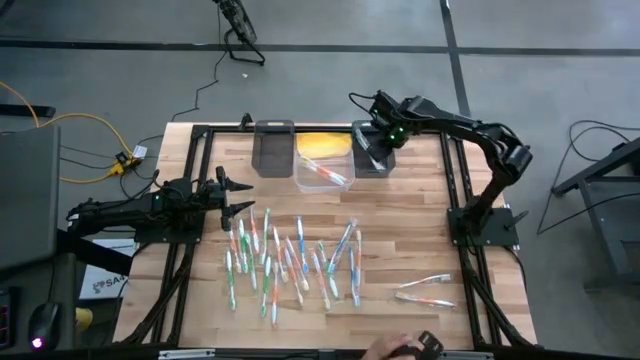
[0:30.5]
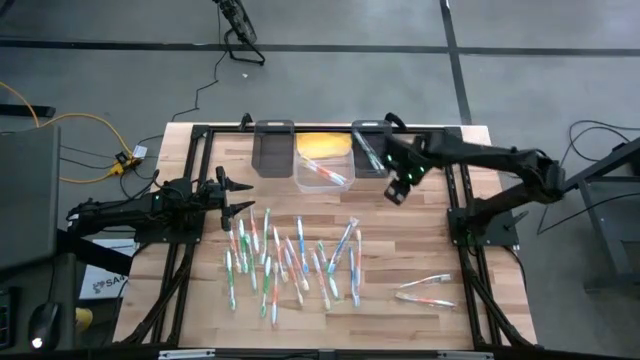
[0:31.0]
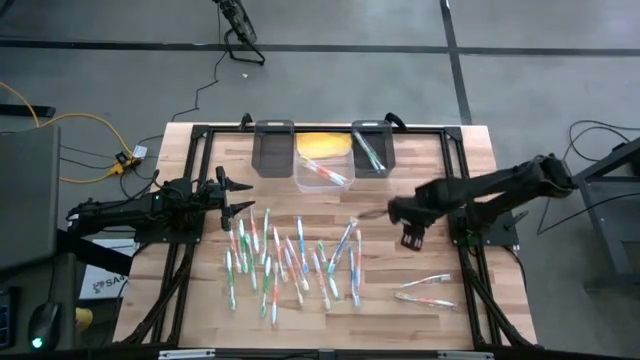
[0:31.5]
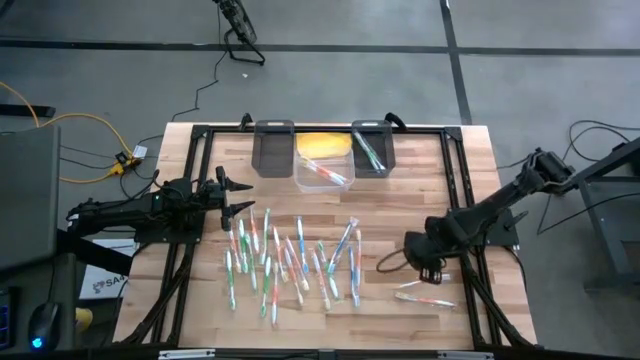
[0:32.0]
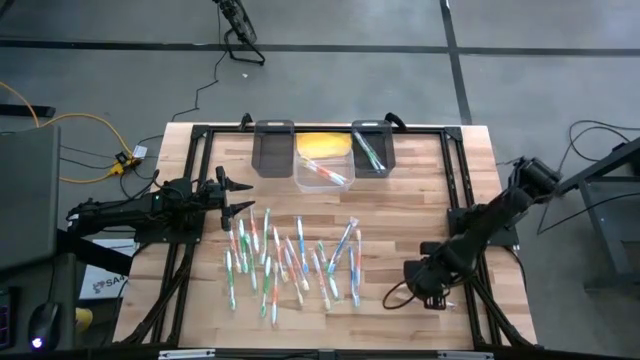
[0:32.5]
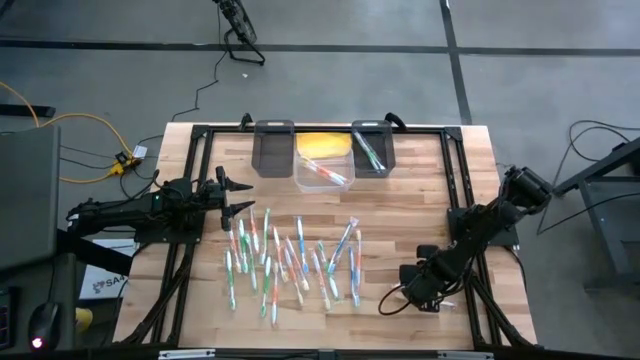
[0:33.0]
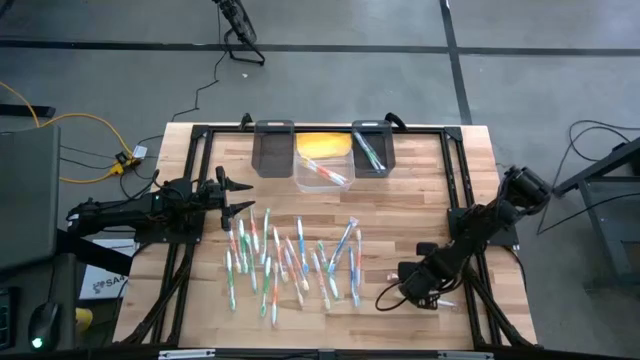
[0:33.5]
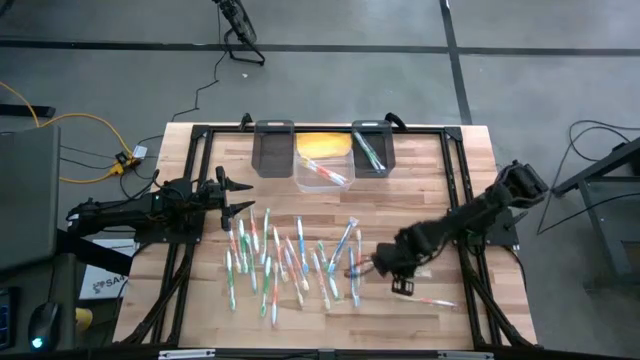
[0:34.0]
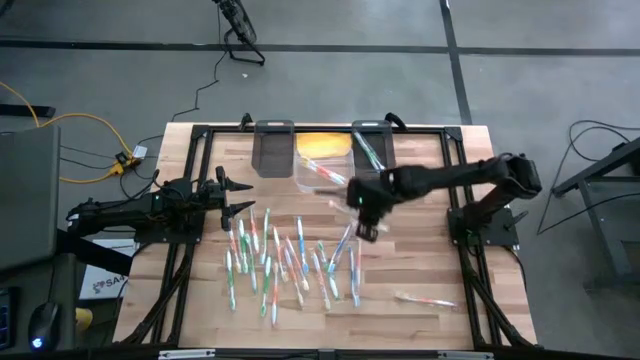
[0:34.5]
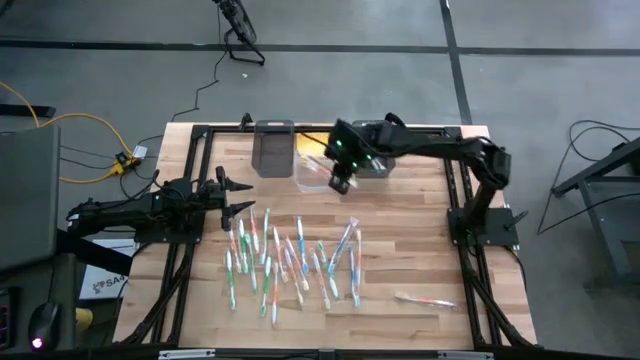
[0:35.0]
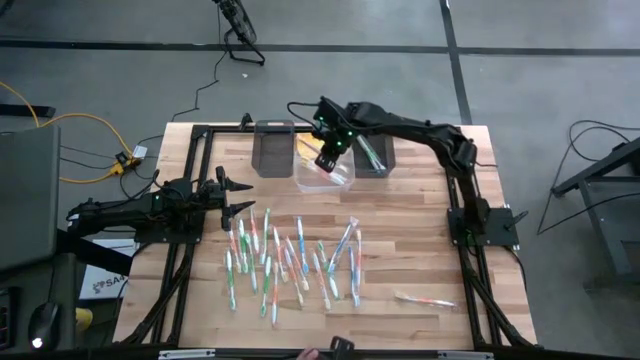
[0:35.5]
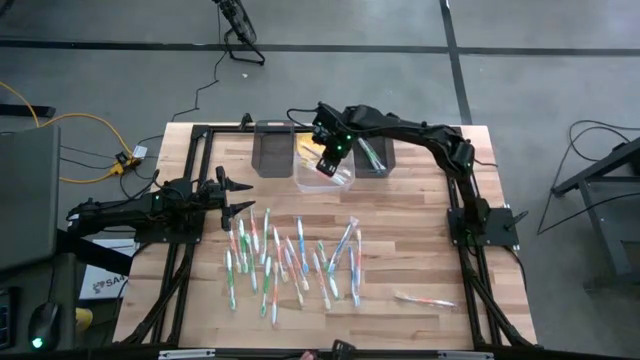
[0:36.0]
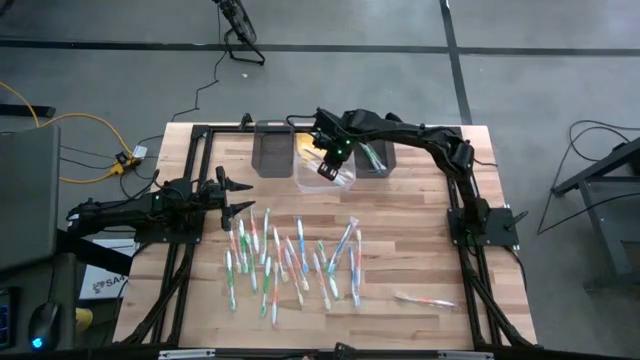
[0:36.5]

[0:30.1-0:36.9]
Task: Pick & Place Toothbrushes
Put the orange toothbrush into the transparent bin

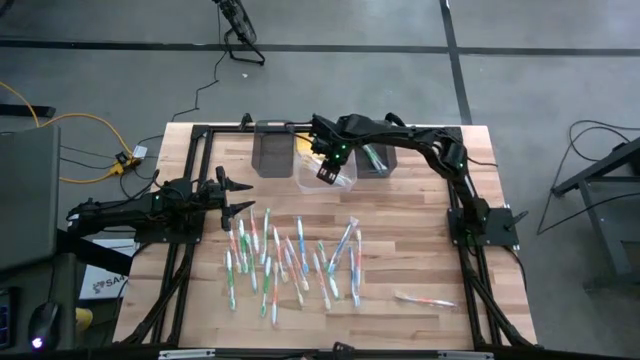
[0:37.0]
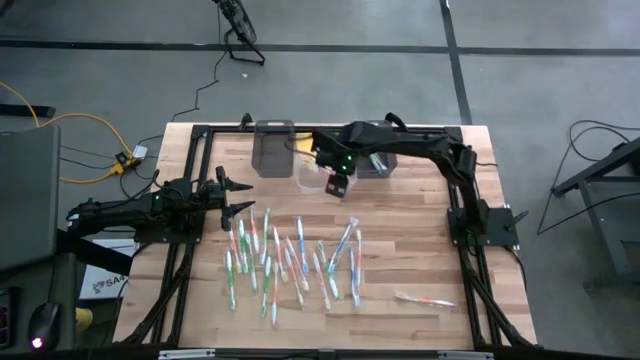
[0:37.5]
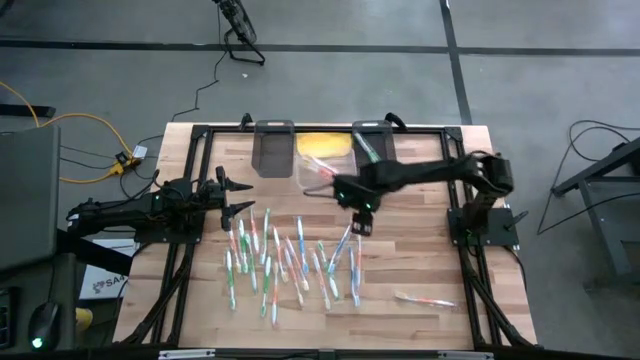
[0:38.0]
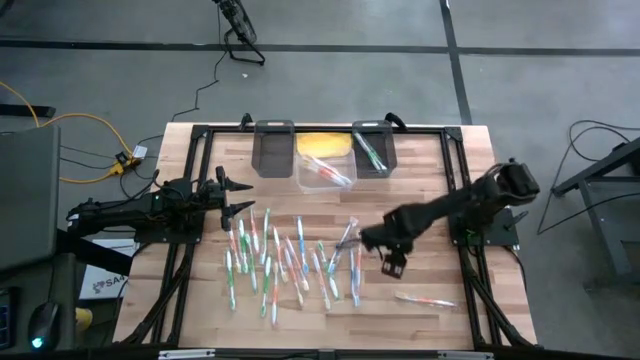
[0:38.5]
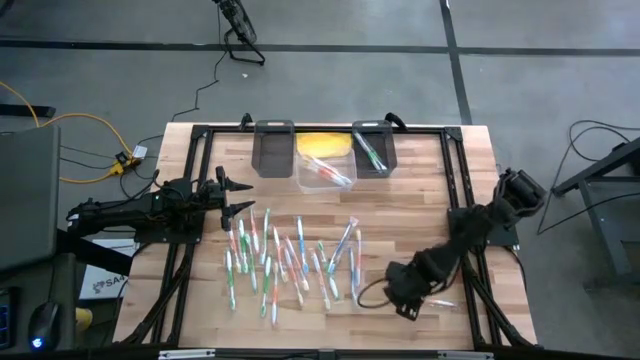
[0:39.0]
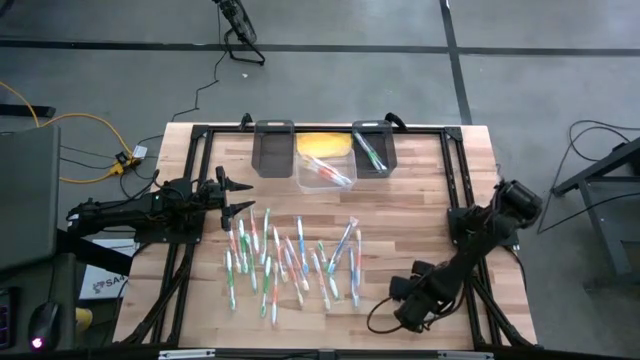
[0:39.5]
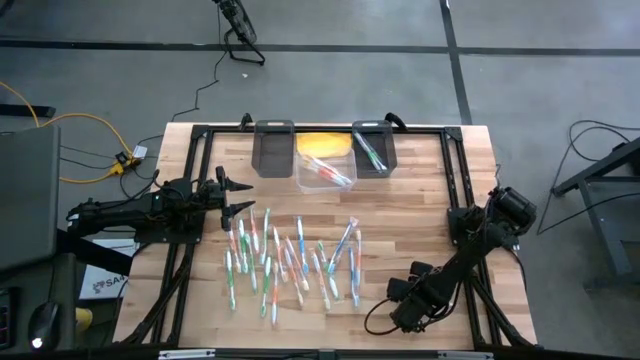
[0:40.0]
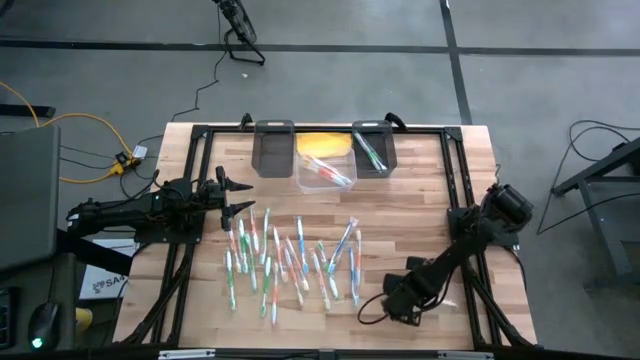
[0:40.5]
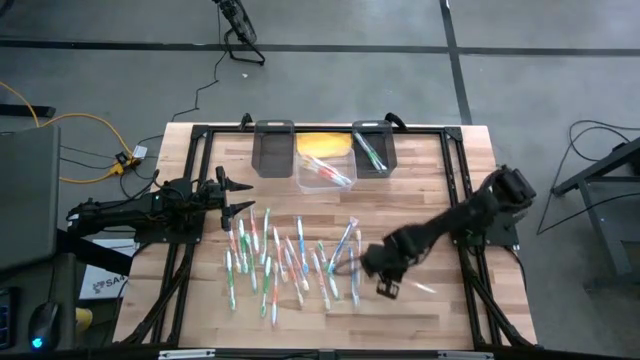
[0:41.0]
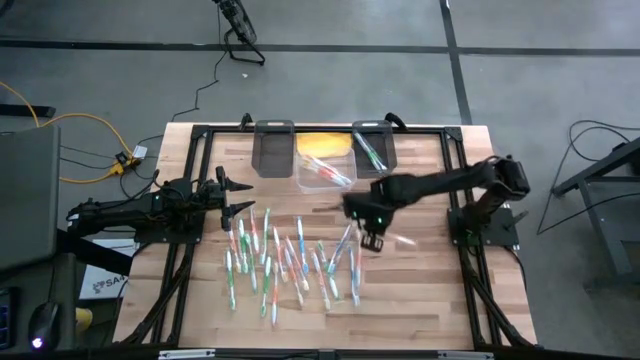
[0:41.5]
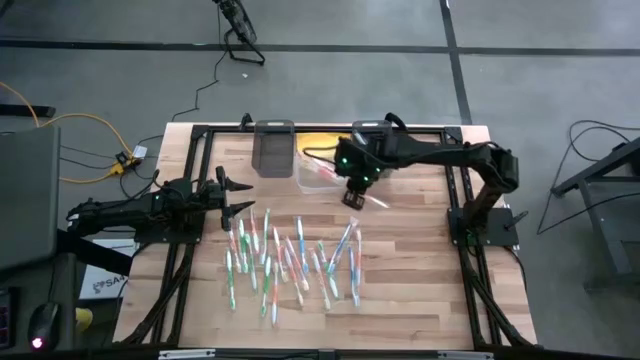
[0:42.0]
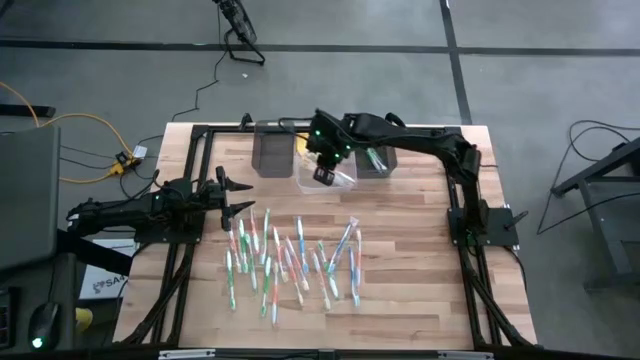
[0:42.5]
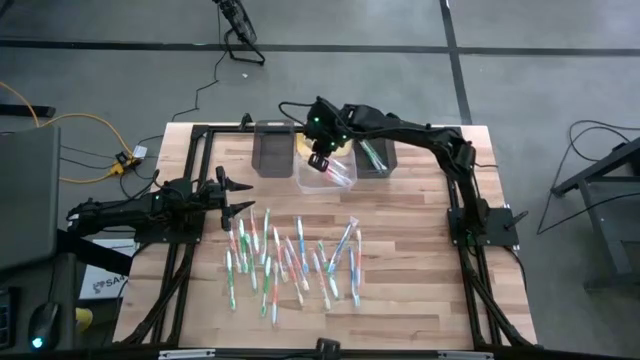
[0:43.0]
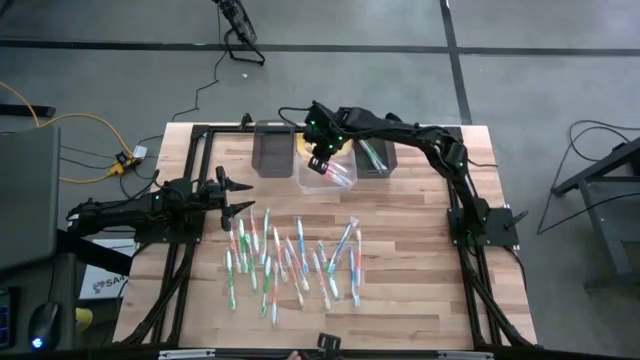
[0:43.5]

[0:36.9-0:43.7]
Put the orange toothbrush into the transparent bin

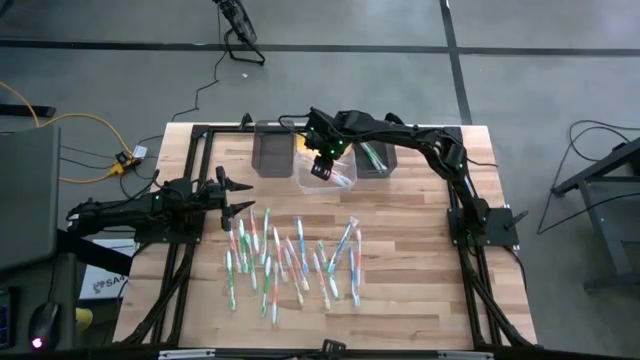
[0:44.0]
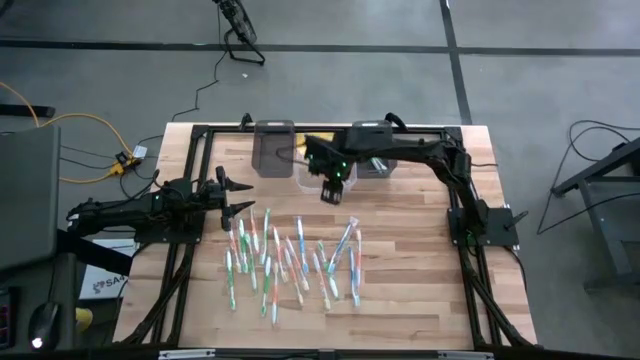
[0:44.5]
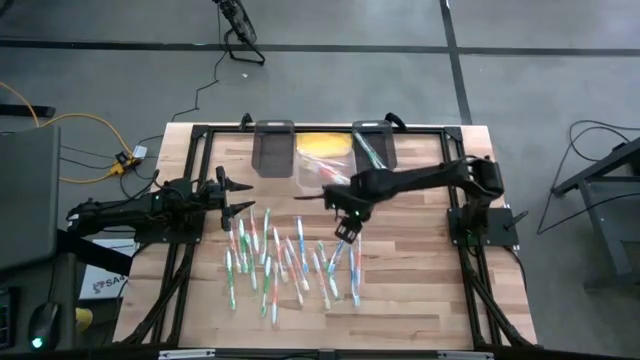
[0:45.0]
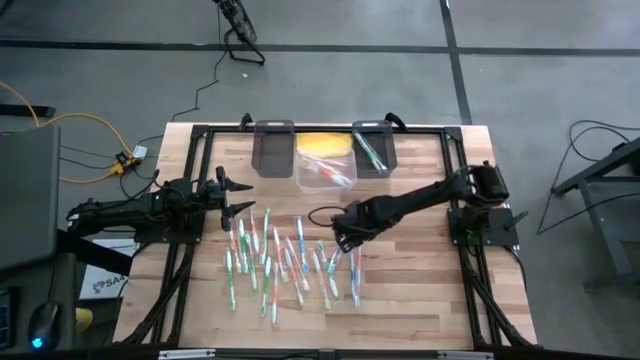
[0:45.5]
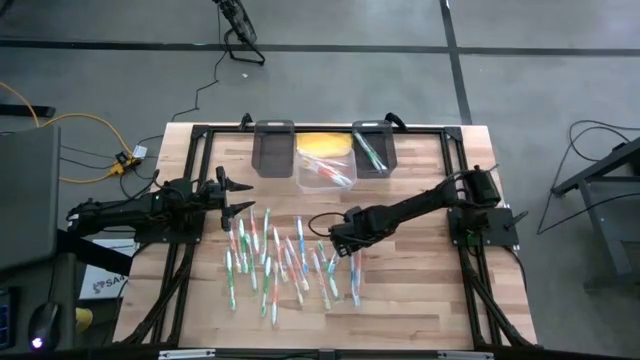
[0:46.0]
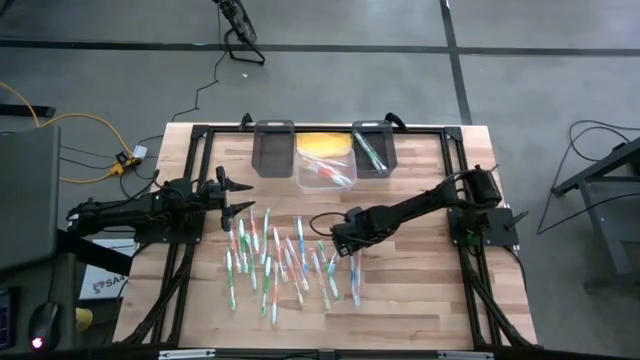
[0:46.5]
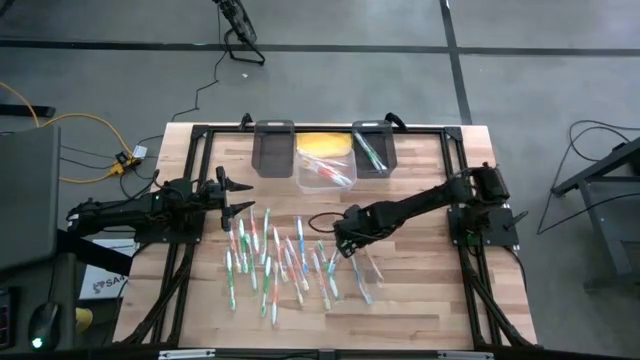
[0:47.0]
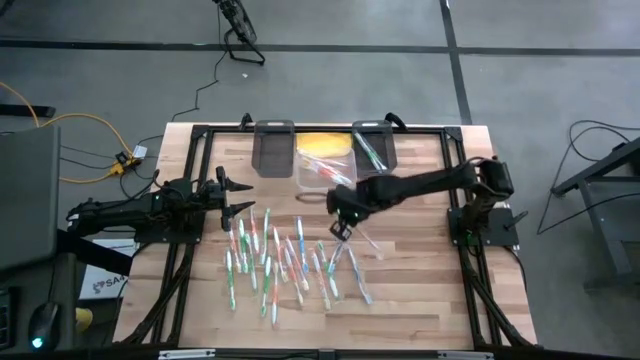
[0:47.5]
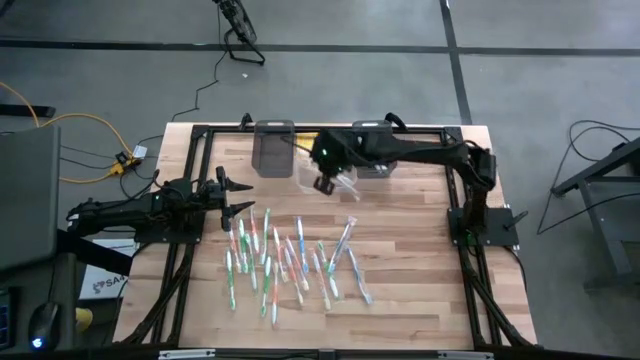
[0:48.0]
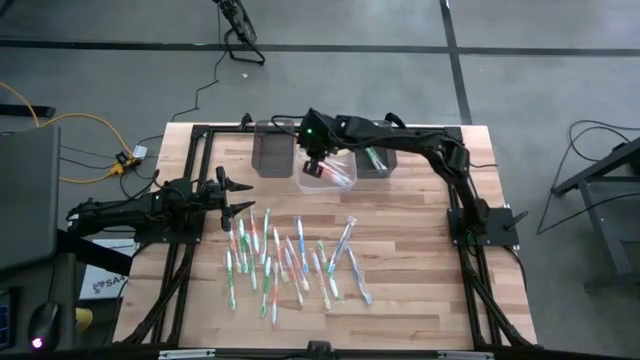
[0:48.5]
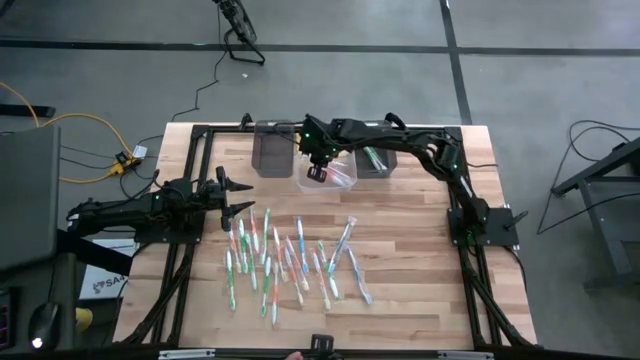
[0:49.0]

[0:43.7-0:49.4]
Put the orange toothbrush into the transparent bin

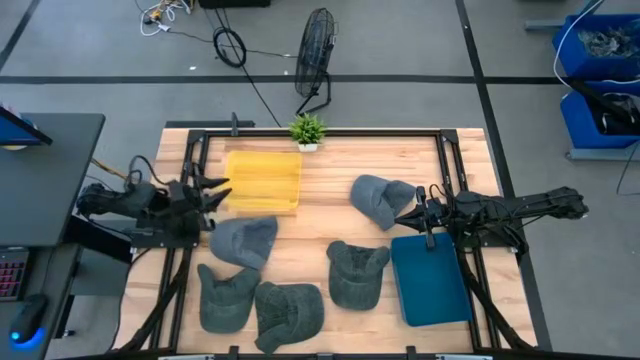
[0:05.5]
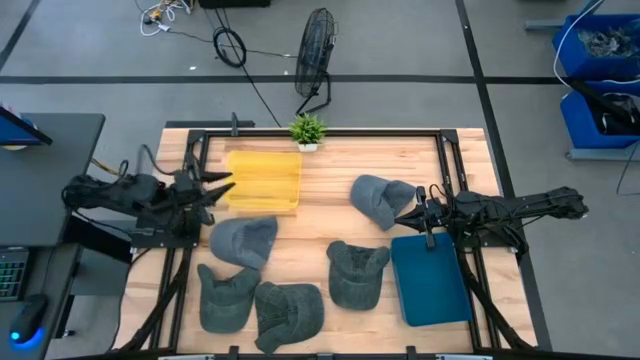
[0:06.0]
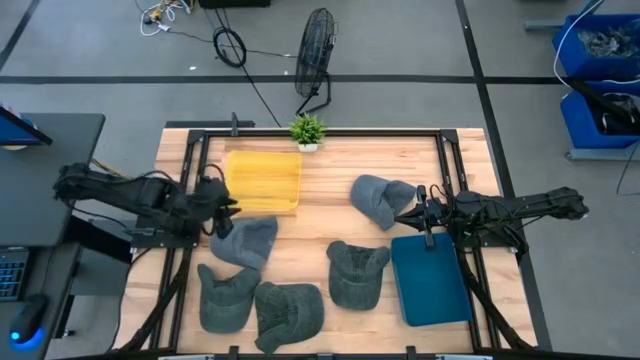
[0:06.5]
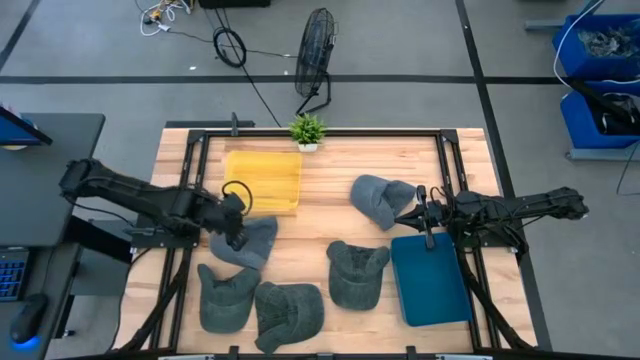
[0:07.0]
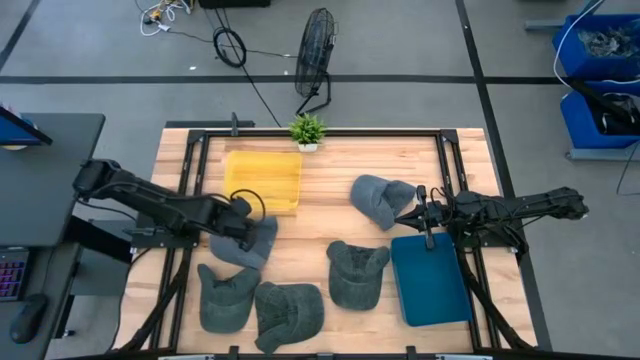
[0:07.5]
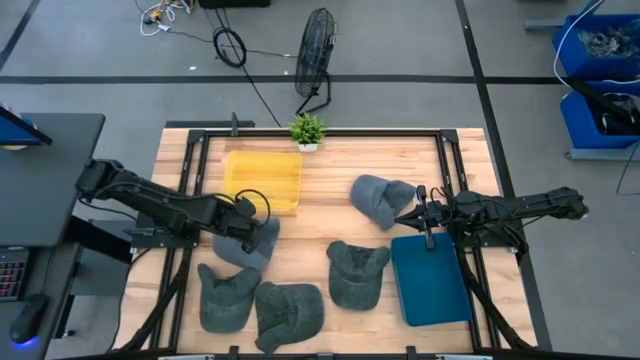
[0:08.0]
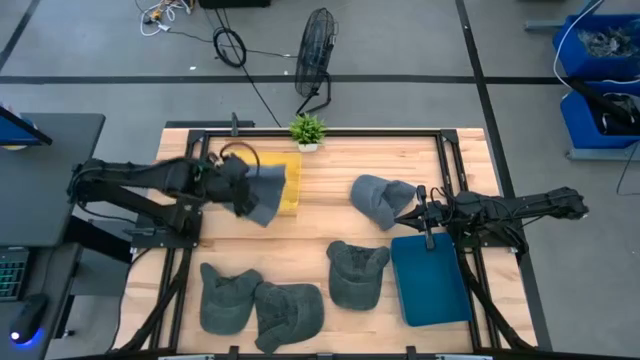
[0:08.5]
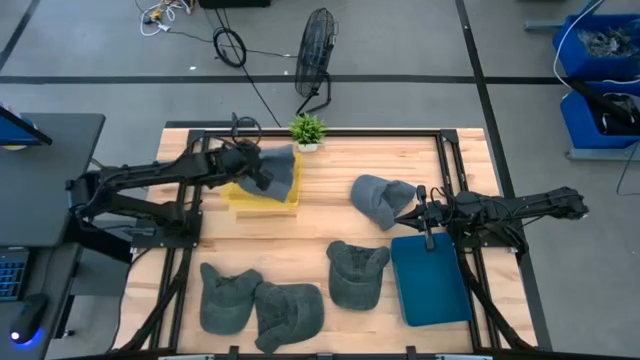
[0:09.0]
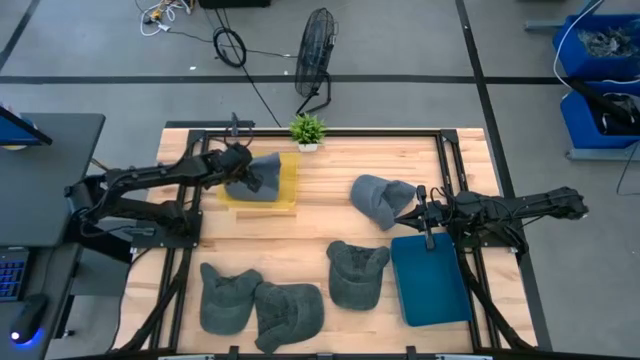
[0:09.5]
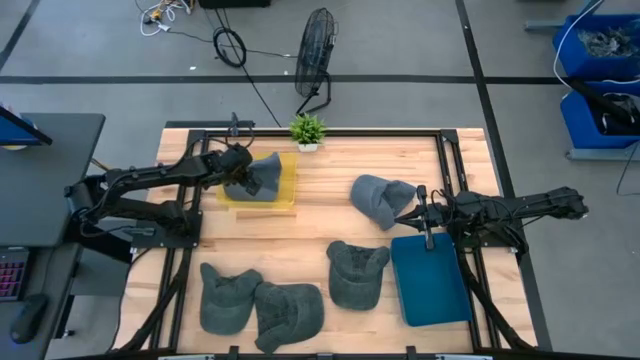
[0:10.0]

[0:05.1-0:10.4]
Task: Pick & Place hat
Put the left blue cap into the yellow bin
